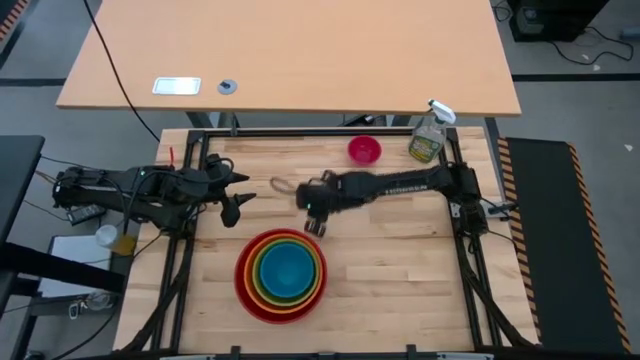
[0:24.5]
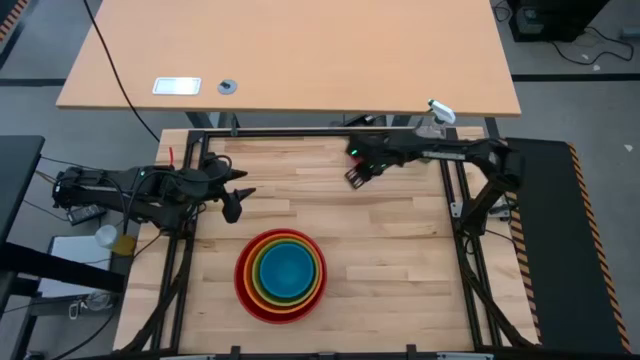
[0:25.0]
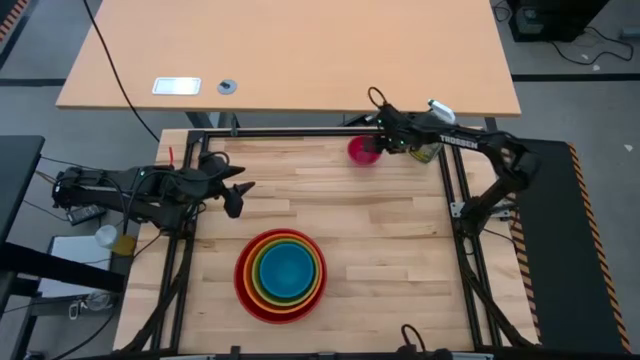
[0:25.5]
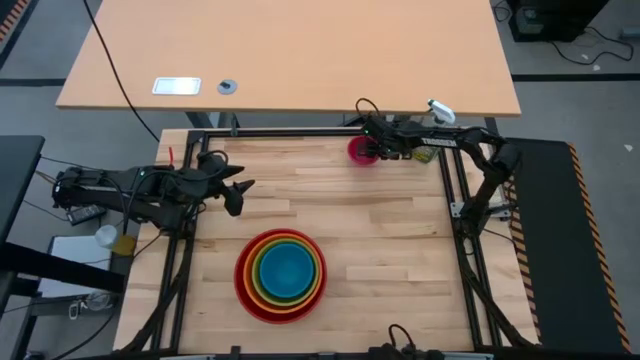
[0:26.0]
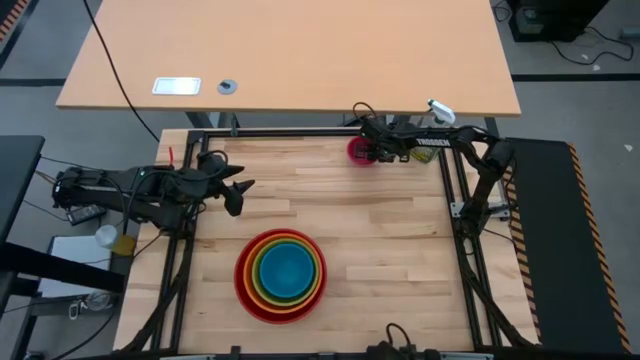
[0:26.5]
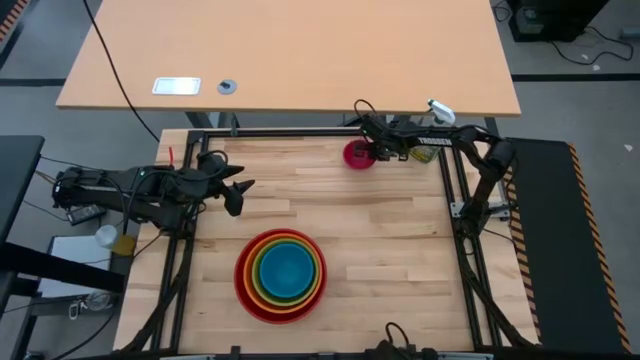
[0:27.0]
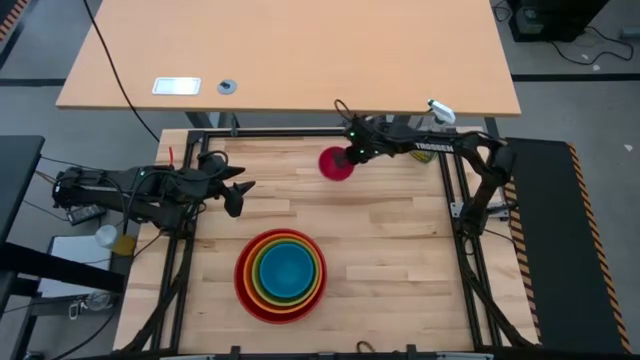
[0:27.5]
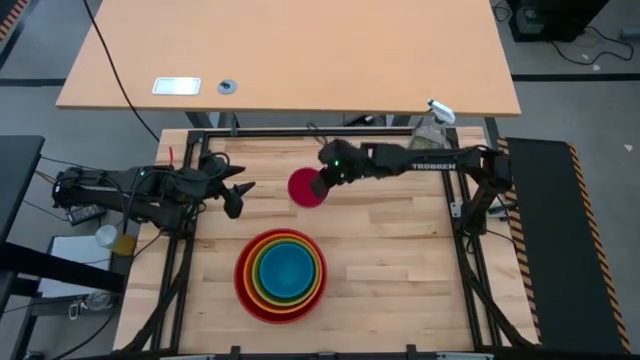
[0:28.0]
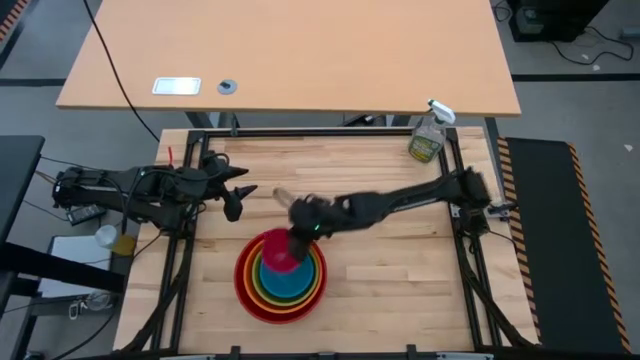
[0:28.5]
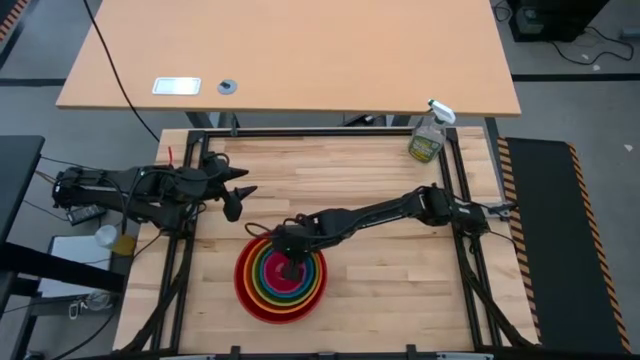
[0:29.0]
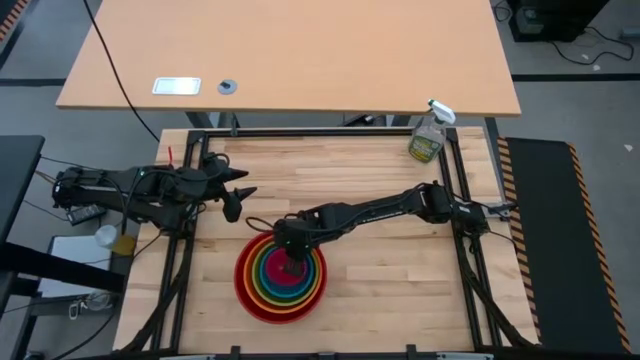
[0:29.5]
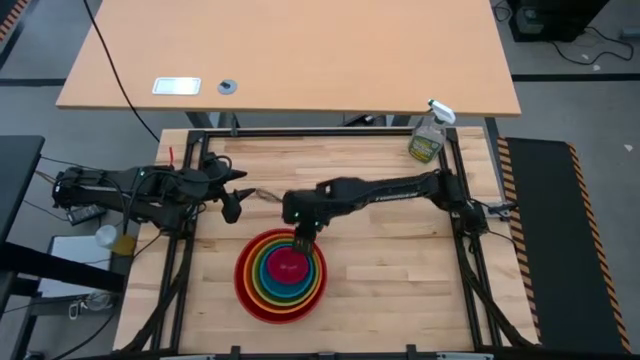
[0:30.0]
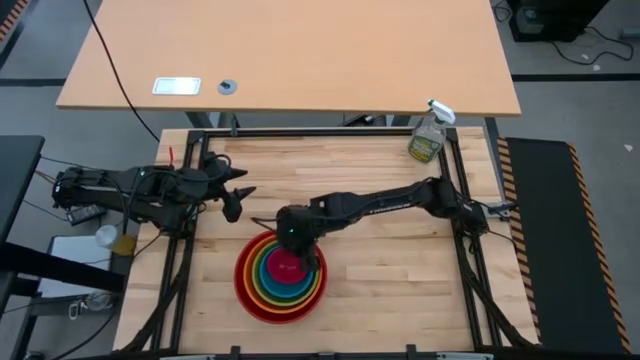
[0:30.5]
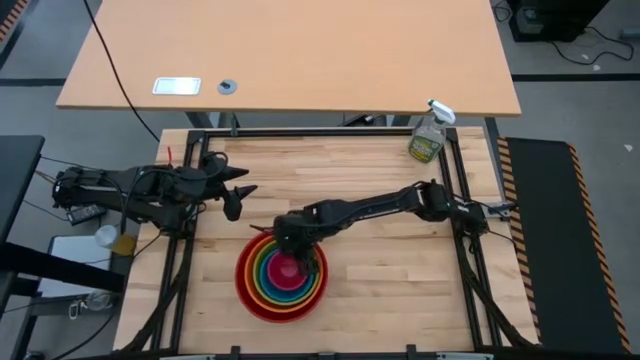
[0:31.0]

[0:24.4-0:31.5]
Stack the extra small pink bowl on top of the small blue bowl

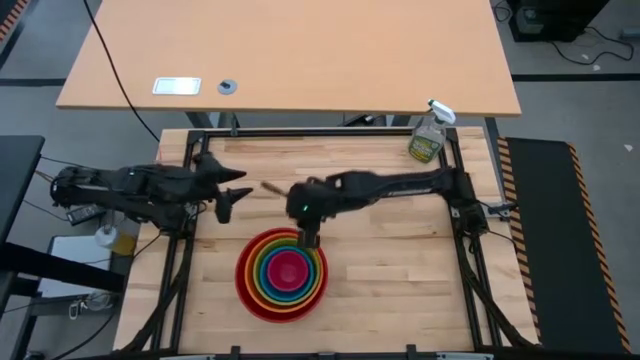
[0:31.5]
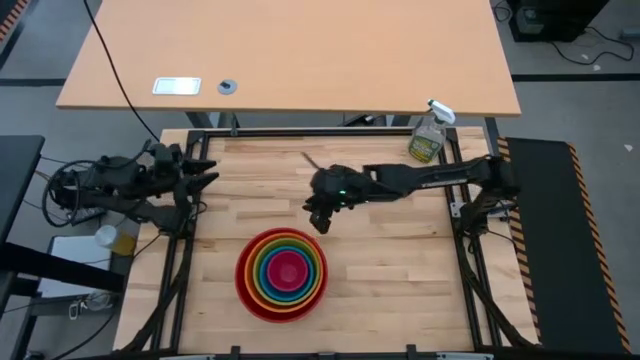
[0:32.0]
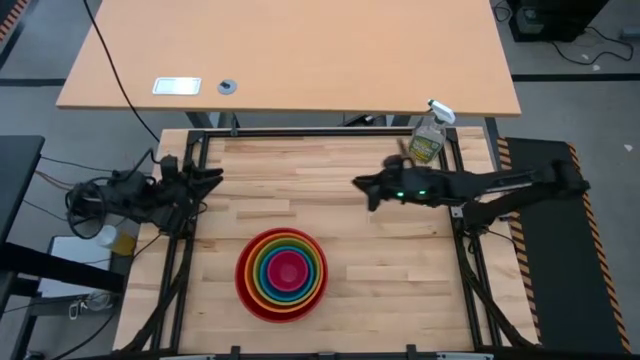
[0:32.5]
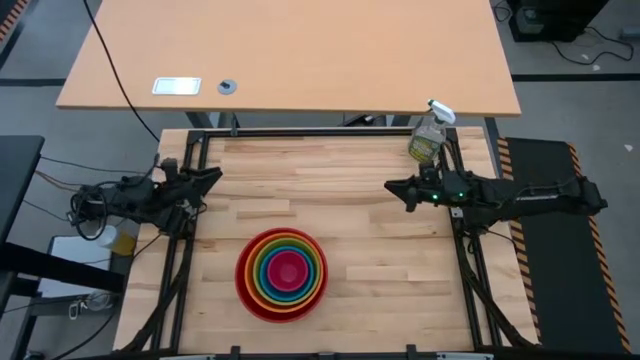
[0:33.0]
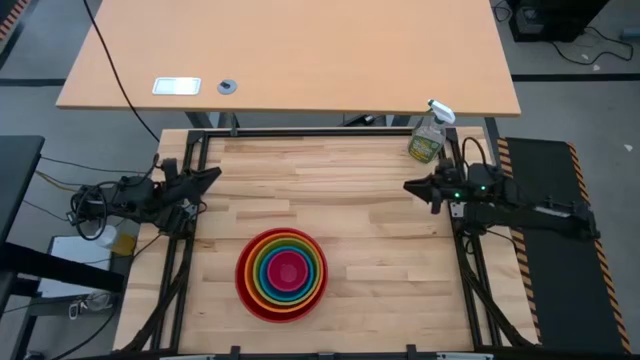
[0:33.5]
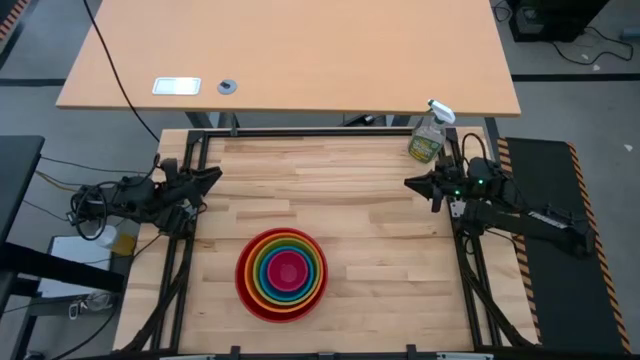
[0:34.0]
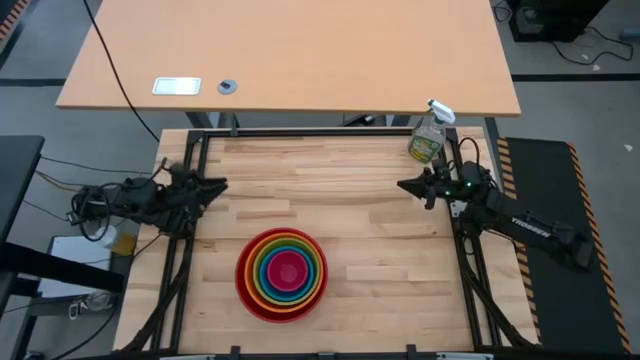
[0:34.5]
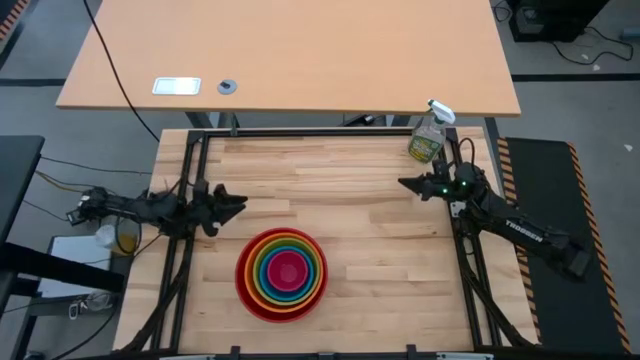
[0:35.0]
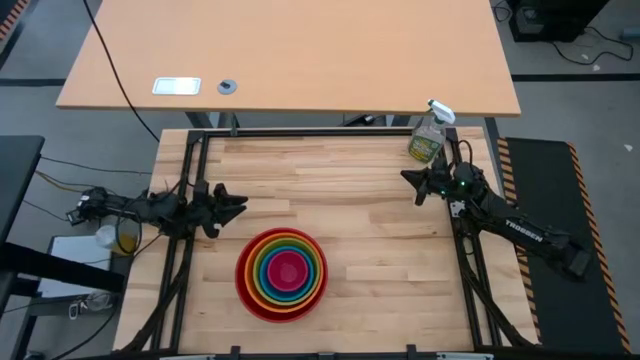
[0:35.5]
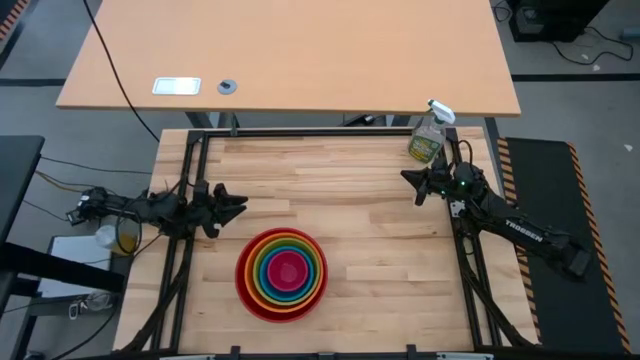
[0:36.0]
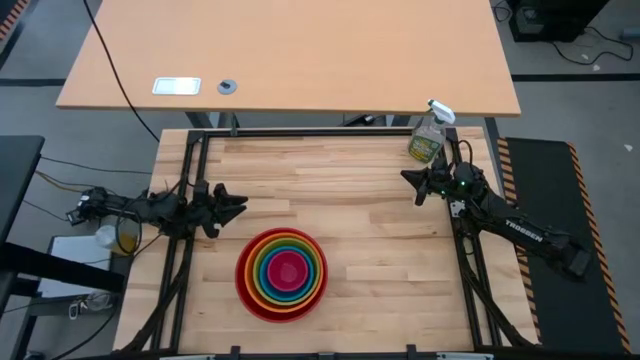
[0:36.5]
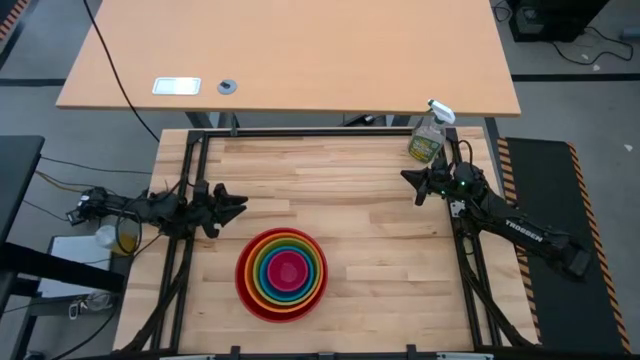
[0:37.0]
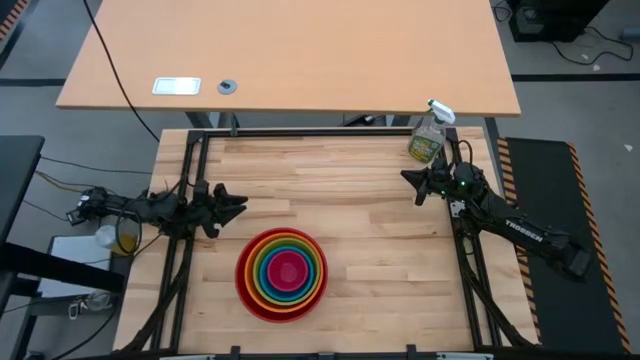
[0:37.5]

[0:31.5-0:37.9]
Return to Home Position
